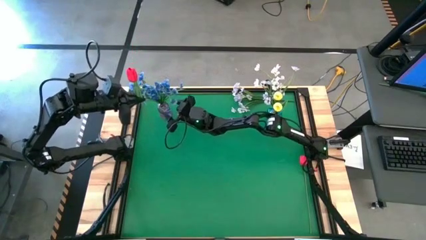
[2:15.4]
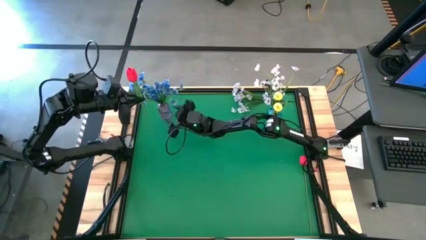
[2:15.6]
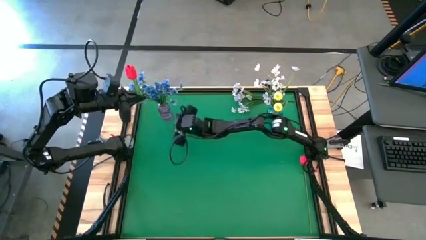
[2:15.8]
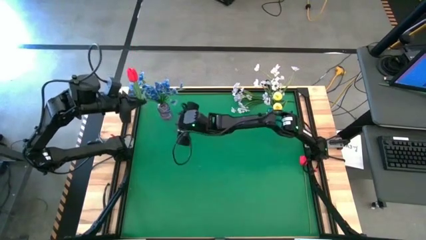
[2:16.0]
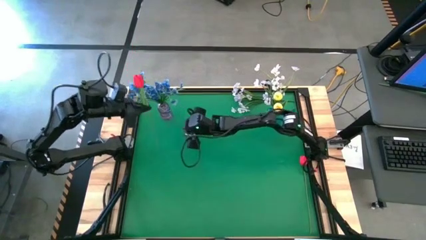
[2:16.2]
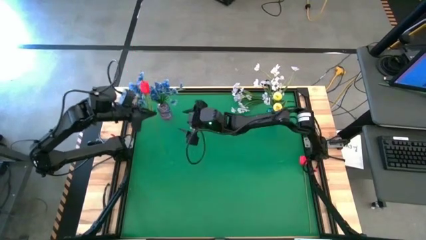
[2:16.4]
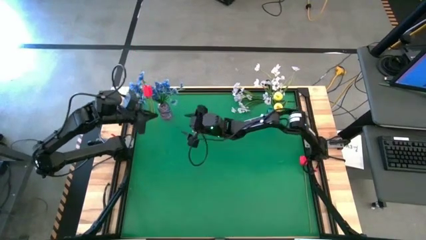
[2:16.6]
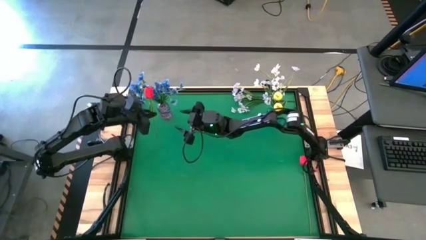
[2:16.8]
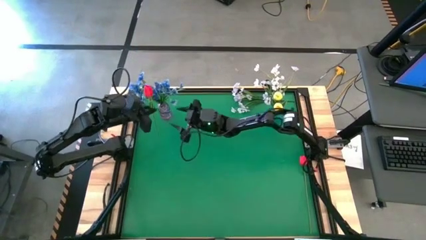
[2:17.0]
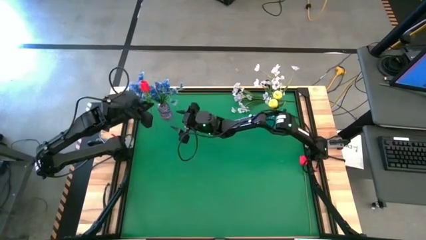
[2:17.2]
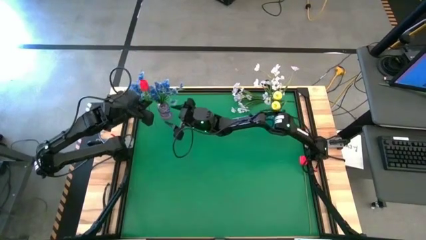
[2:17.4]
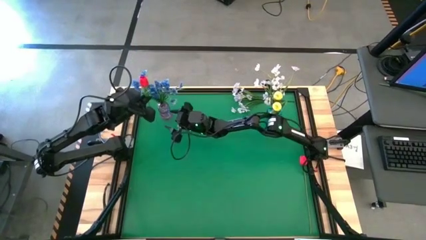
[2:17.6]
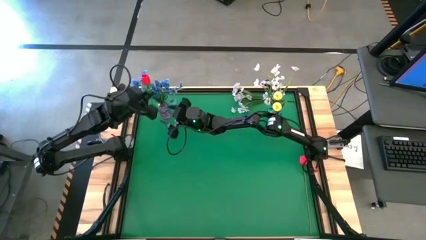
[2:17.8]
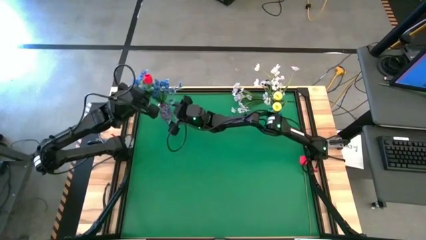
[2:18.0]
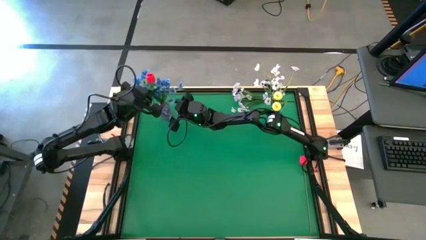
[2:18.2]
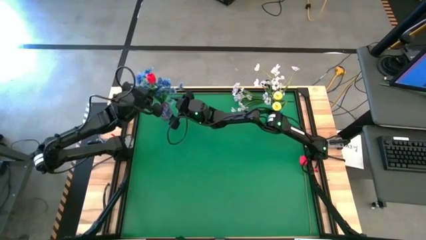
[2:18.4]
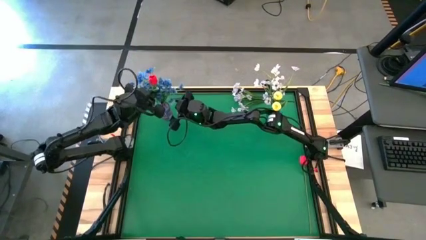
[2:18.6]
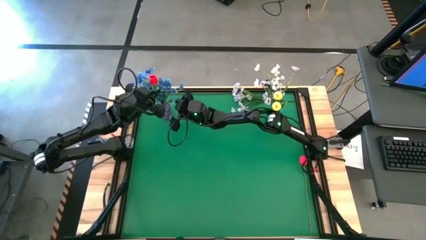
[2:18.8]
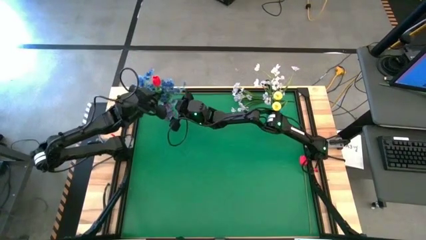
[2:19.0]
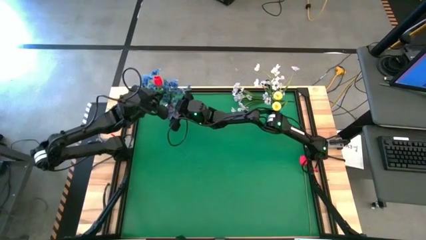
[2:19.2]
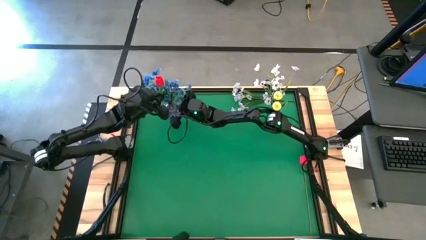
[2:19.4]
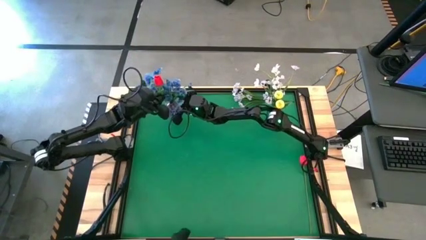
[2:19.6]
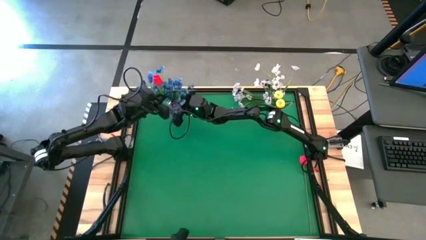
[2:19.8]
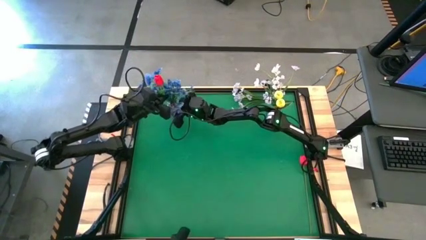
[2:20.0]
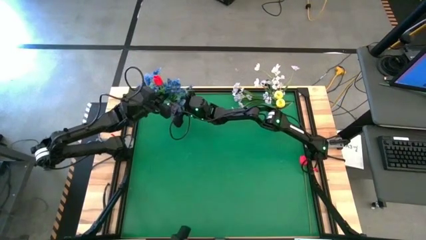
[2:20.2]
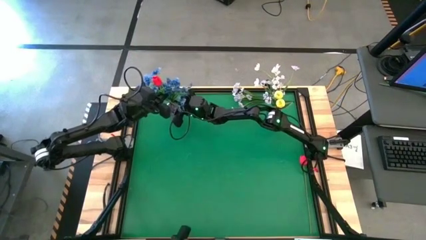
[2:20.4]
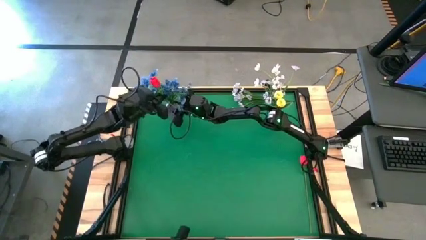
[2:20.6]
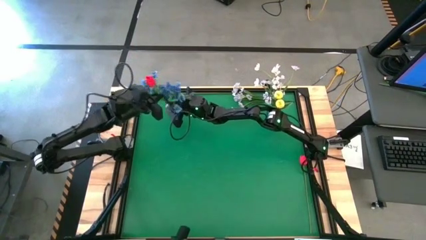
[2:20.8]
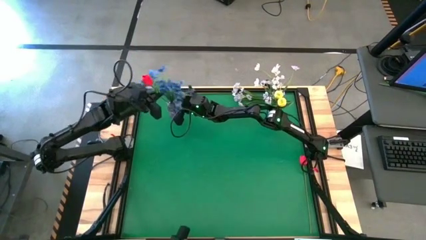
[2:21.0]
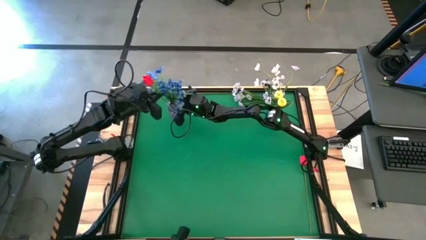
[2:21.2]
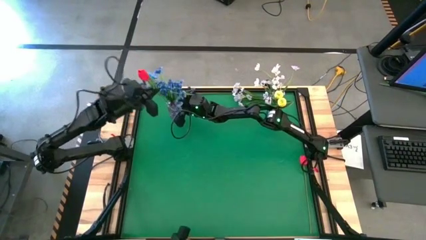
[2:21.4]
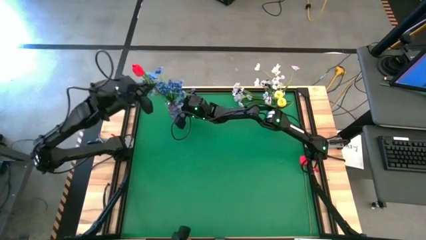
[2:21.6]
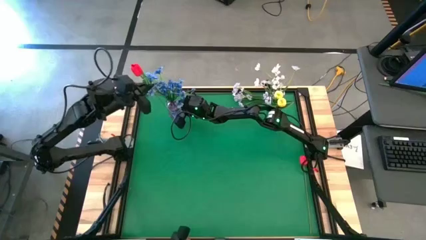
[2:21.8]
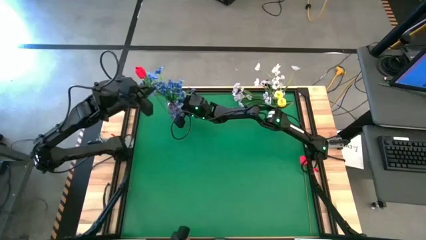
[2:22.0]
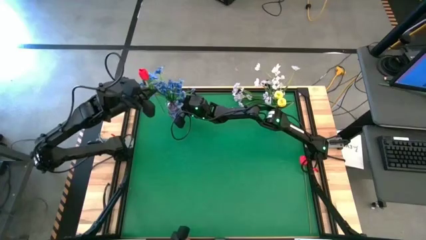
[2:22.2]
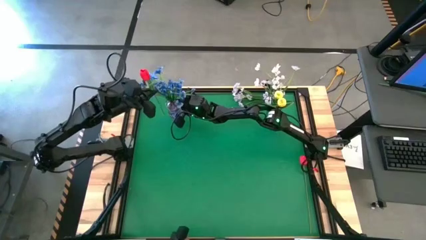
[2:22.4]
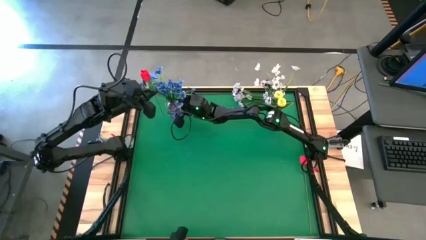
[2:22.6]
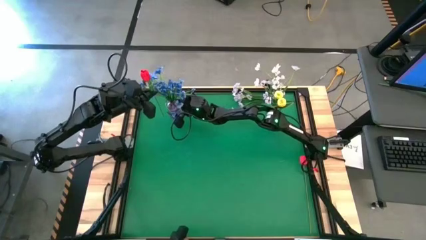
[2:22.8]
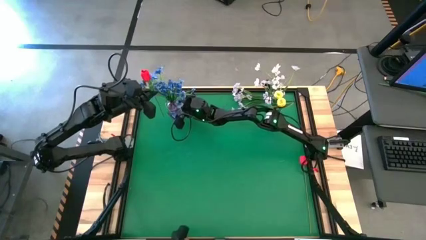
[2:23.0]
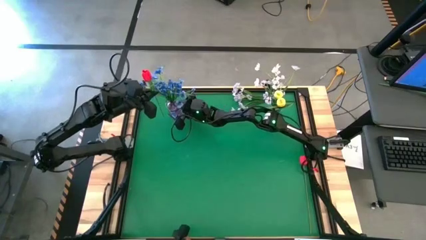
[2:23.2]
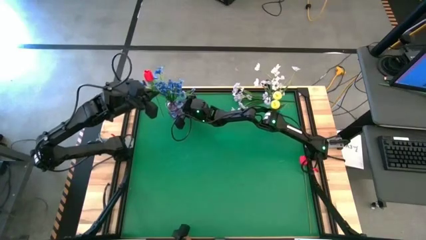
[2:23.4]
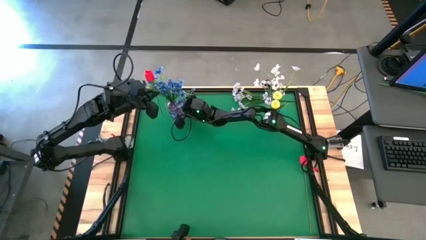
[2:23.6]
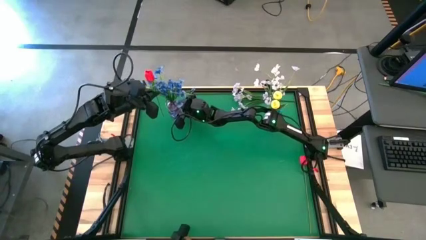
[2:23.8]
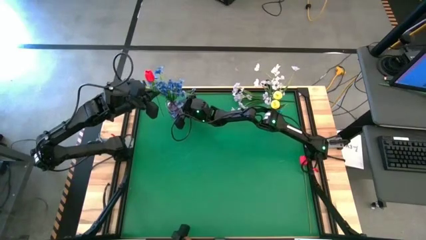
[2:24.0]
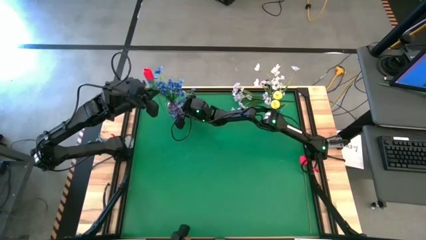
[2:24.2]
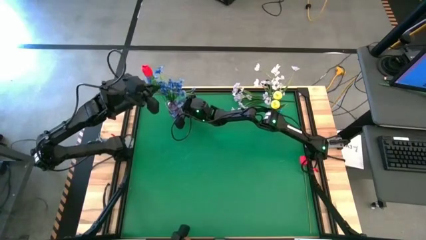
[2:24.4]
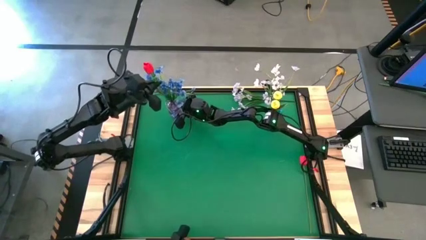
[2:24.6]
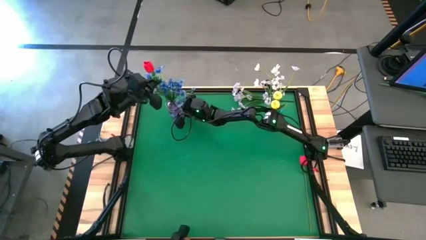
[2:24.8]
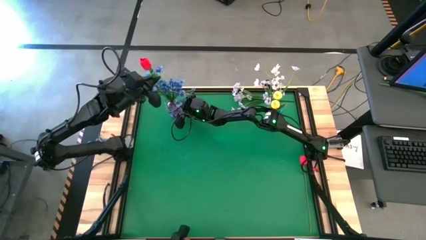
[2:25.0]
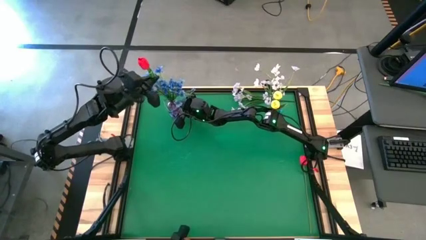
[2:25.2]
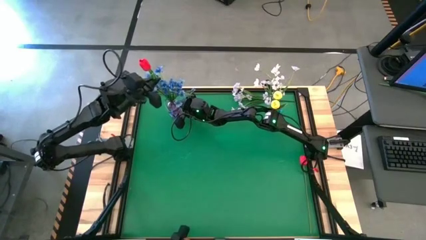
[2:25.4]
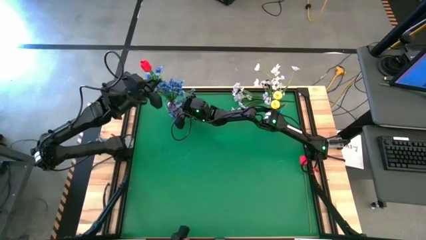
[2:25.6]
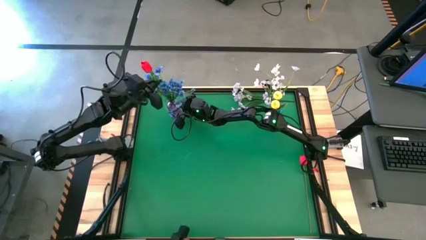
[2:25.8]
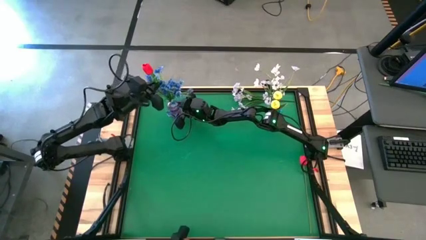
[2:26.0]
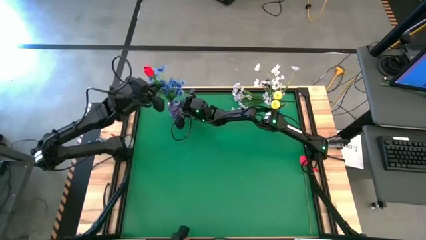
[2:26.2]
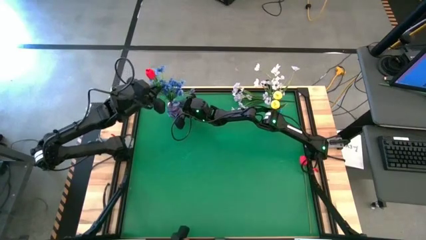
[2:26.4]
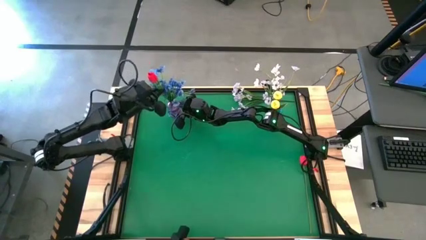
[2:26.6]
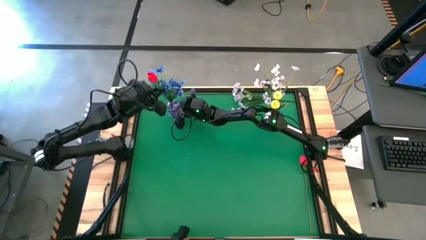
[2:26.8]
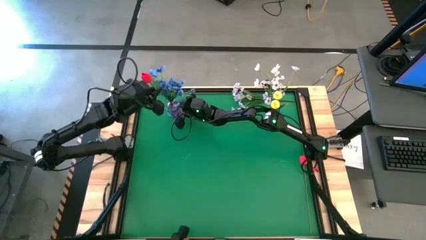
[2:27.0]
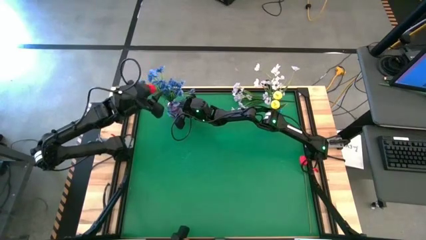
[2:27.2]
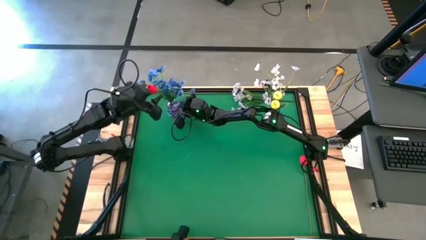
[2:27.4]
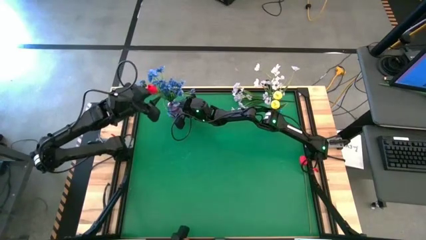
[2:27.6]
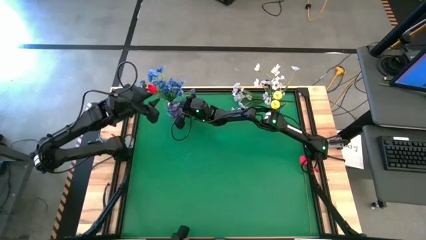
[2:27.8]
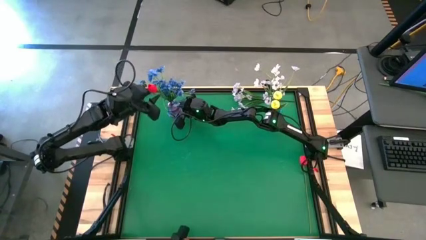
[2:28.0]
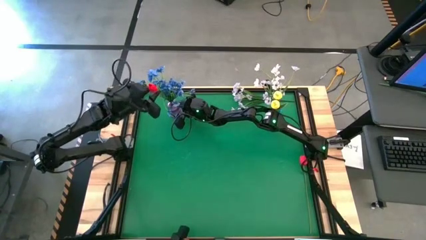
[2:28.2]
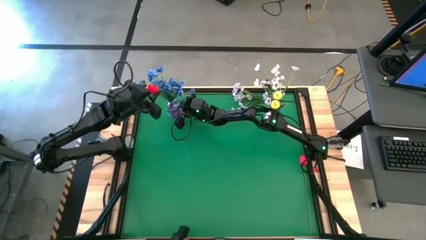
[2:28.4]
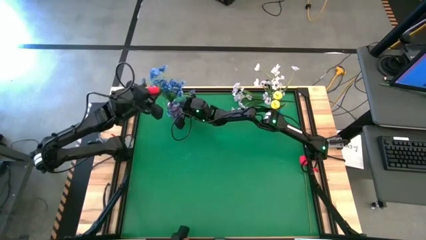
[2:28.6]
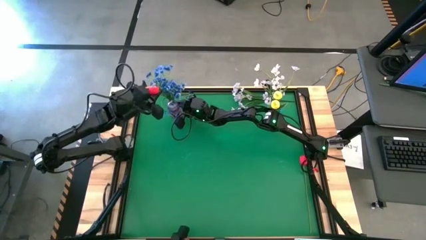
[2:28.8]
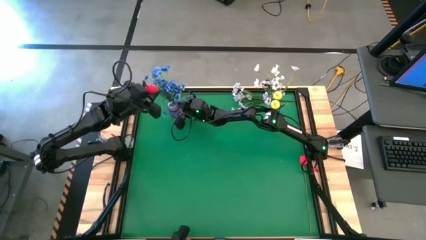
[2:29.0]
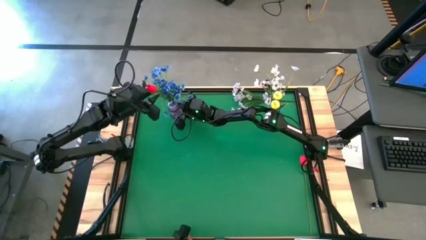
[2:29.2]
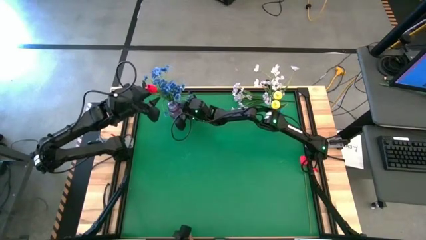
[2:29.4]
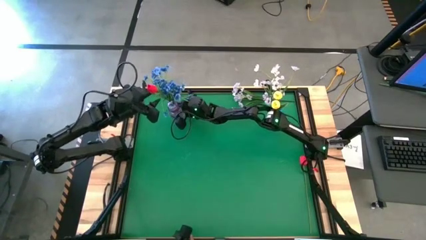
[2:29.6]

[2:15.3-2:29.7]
Task: Sort flowers into vase by color
Put the left red tulip into the purple vase
